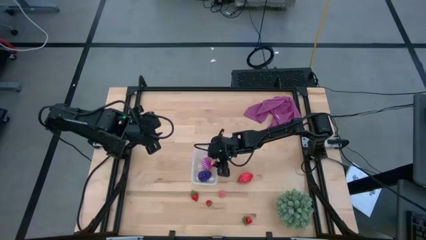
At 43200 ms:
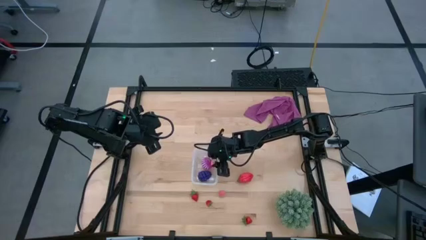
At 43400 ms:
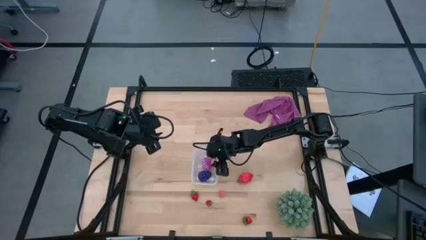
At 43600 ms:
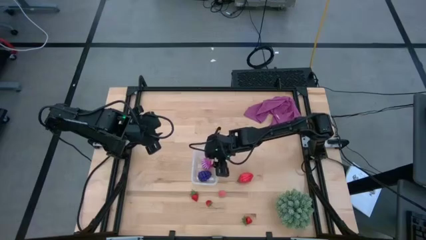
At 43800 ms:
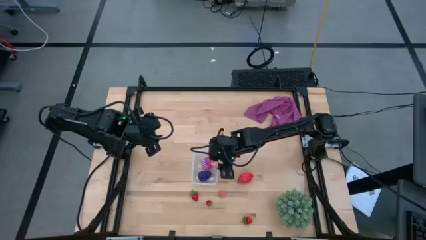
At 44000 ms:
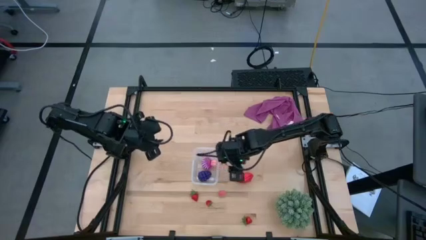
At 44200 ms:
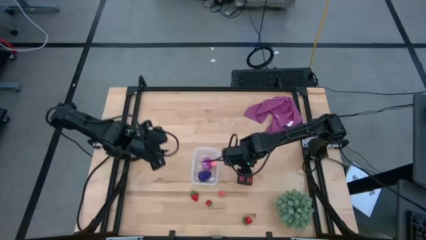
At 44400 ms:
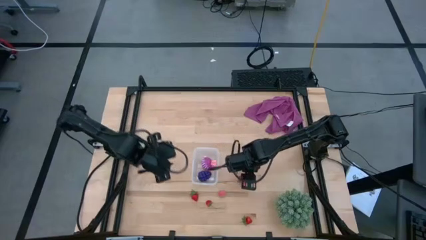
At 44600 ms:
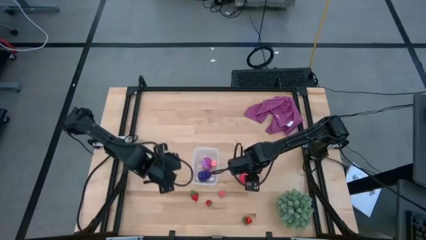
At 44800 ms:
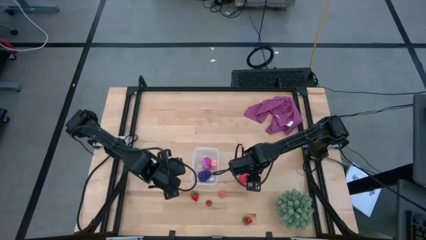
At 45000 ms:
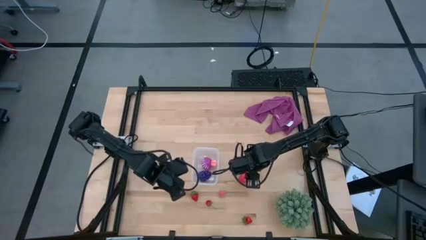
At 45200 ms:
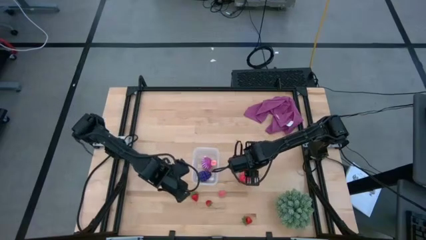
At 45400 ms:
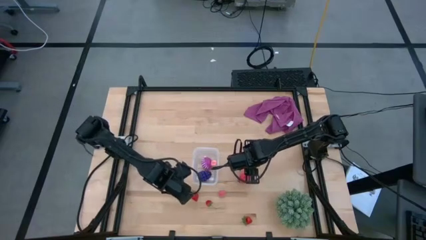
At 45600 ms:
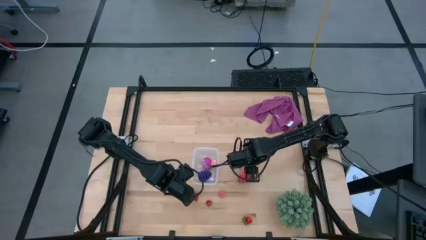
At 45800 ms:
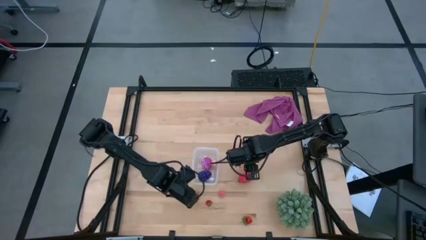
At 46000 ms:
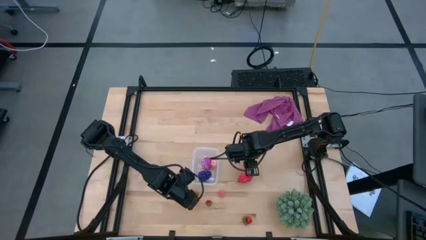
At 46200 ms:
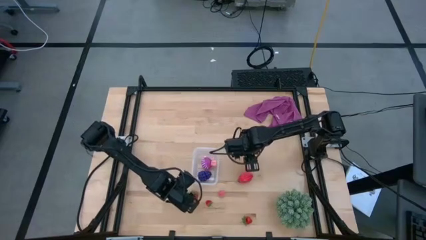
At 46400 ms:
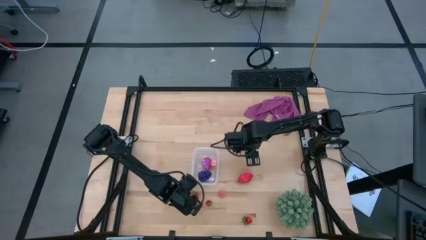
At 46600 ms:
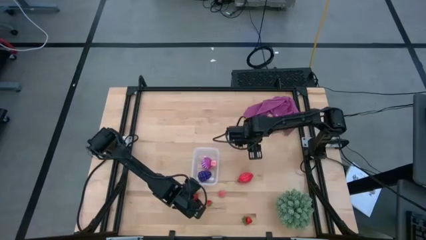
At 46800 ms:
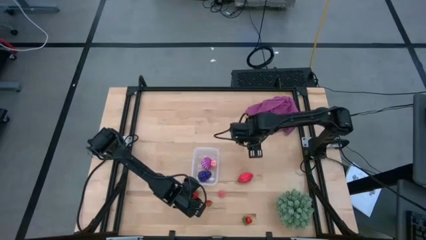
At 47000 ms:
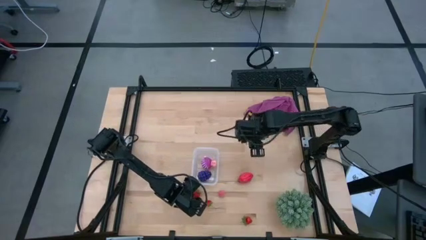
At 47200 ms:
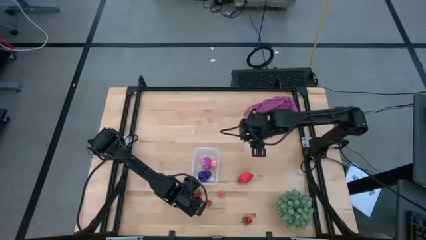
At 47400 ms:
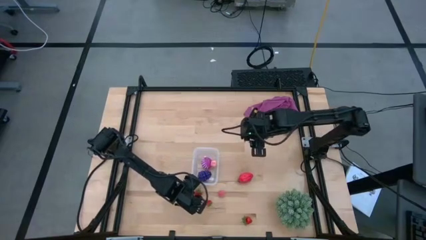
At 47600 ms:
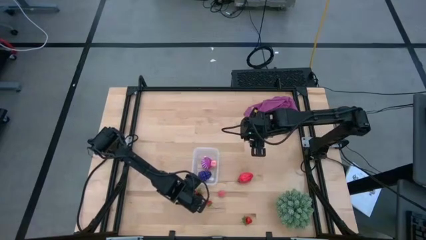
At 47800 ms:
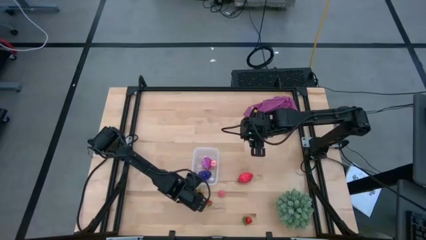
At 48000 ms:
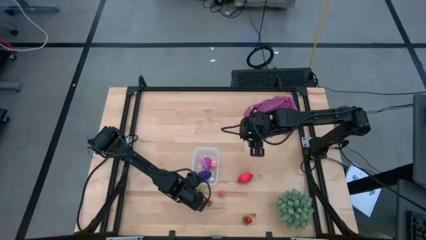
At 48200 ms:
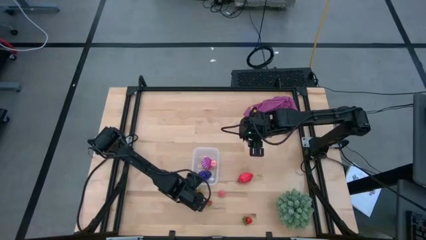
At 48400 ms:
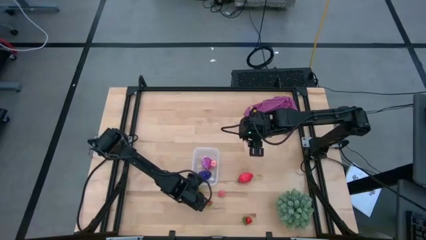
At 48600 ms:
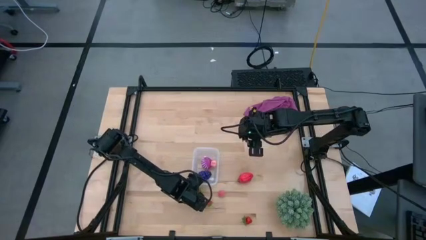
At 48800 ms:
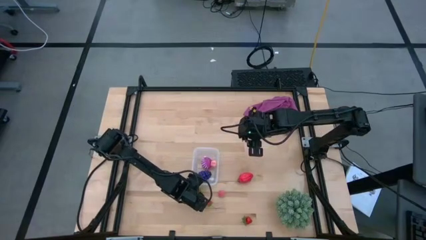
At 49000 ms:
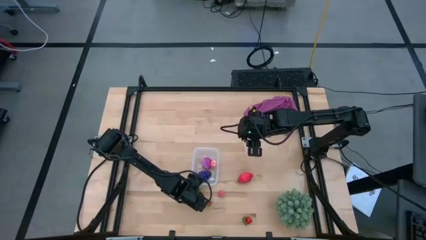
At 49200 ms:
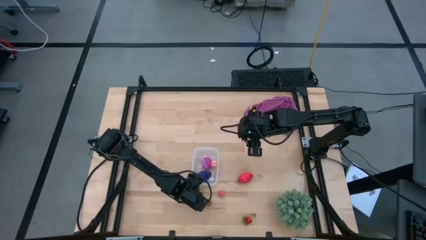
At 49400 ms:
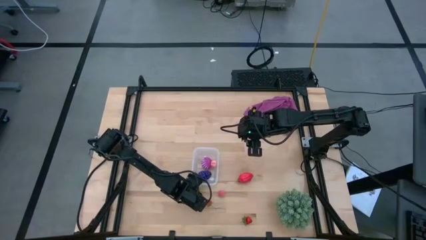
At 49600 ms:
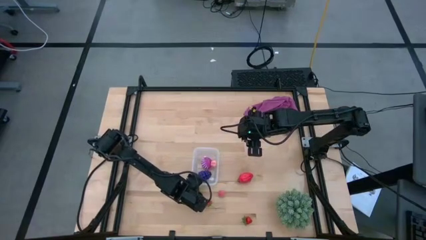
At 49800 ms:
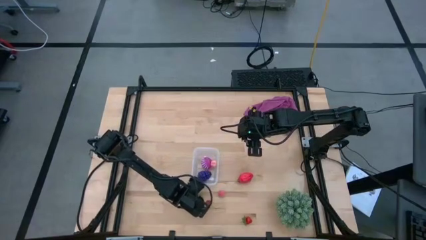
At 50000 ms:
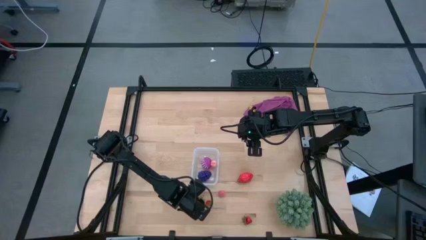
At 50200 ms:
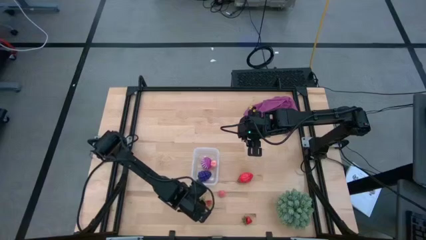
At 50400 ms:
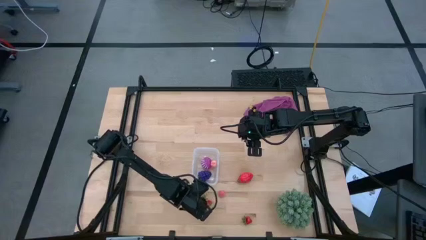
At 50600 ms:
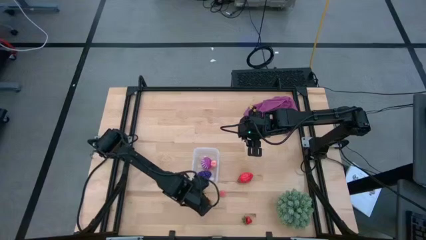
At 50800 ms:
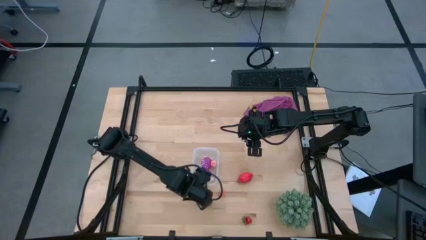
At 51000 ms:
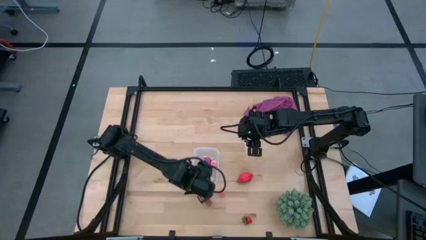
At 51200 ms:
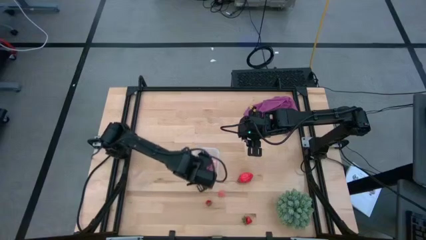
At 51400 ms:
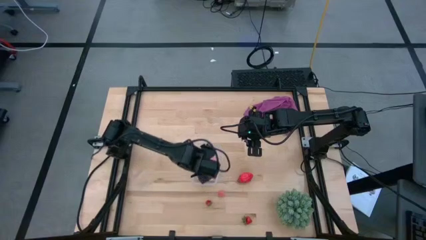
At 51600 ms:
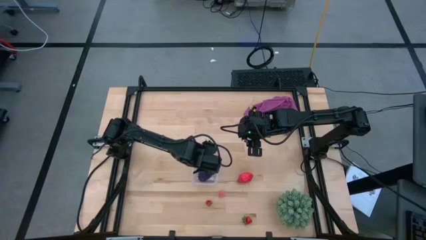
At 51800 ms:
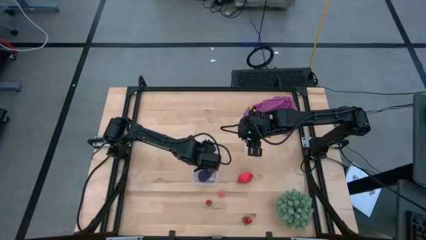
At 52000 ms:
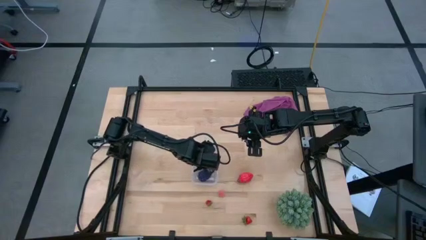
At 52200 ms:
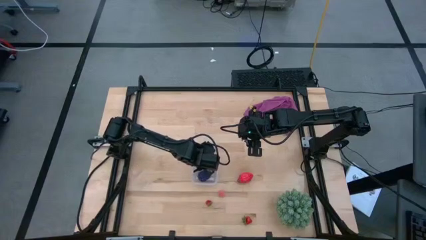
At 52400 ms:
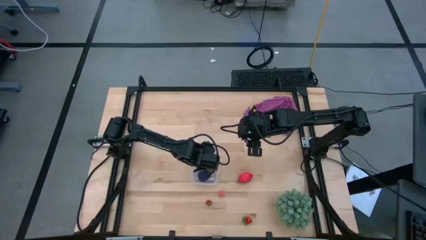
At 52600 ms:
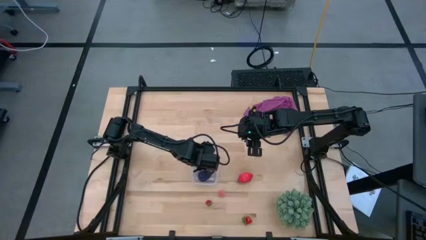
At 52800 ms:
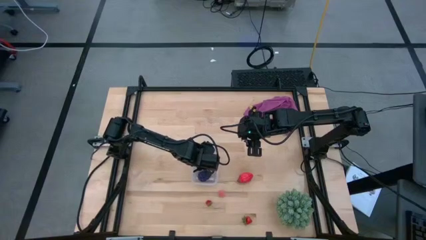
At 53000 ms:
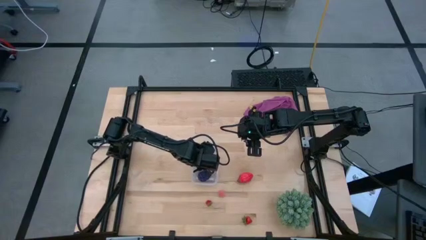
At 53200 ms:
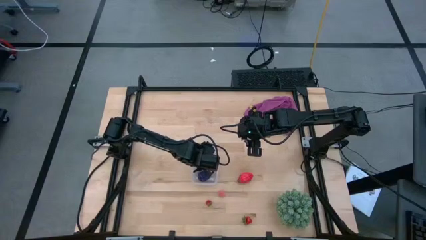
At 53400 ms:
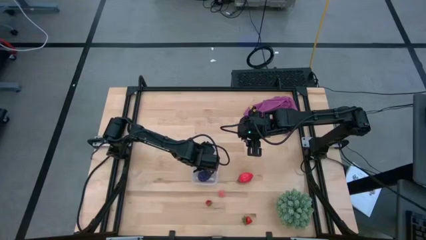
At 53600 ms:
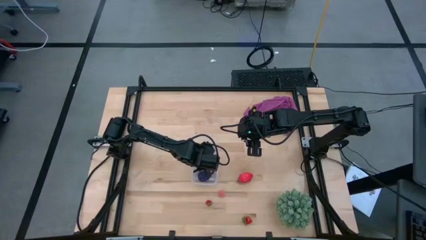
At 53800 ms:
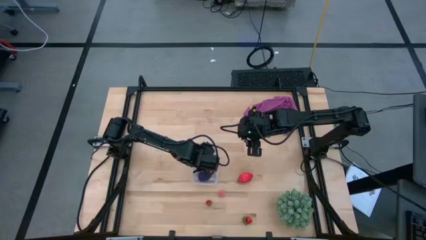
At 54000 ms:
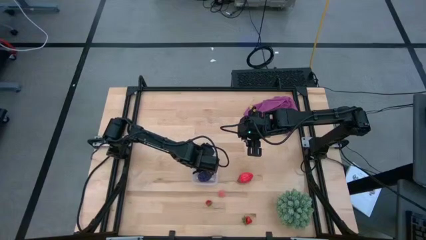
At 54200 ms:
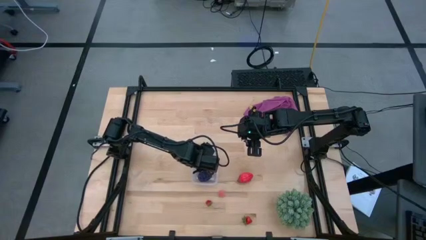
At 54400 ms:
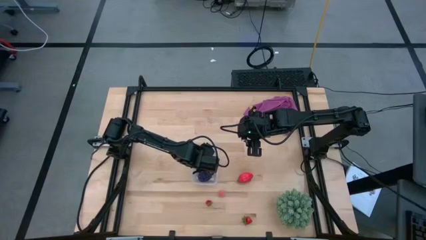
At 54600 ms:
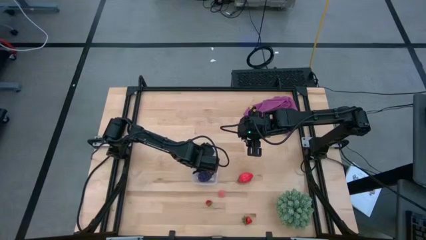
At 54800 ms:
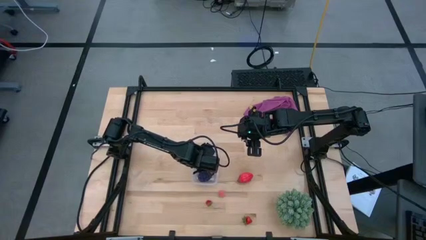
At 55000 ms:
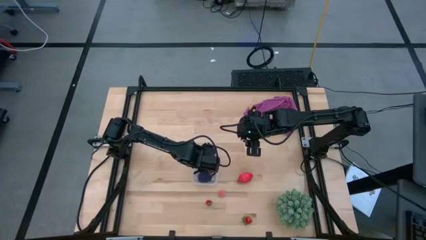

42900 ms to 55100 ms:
Task: Pick and placing Produce into tupperware
Put the red top left strawberry into the transparent bin
